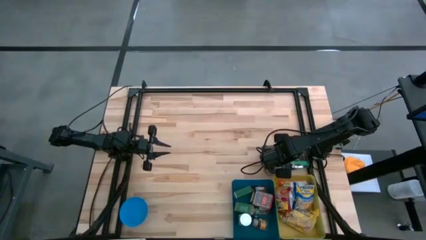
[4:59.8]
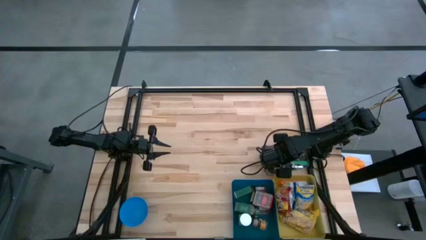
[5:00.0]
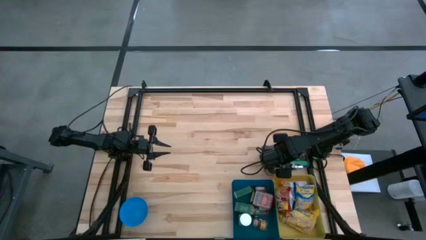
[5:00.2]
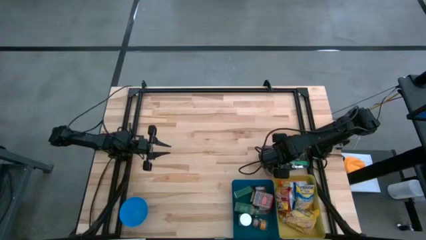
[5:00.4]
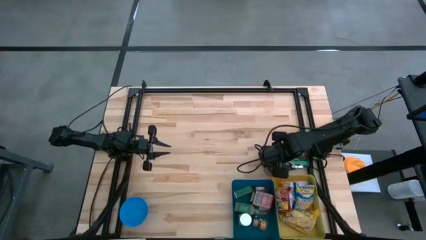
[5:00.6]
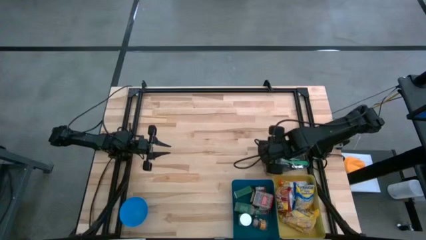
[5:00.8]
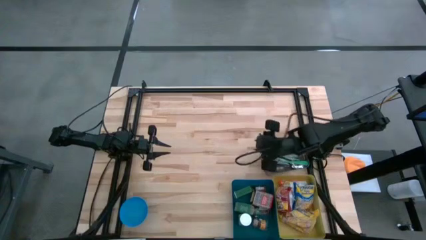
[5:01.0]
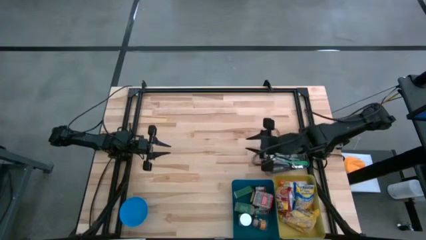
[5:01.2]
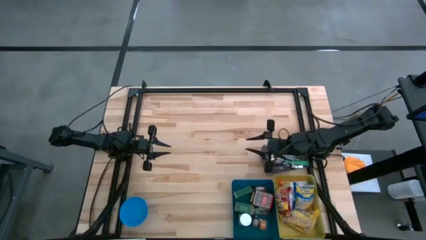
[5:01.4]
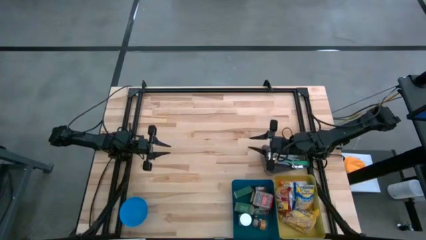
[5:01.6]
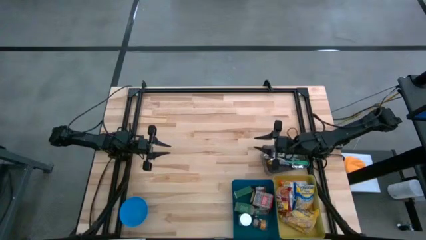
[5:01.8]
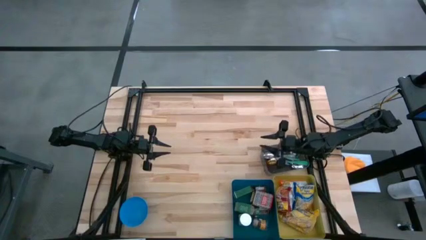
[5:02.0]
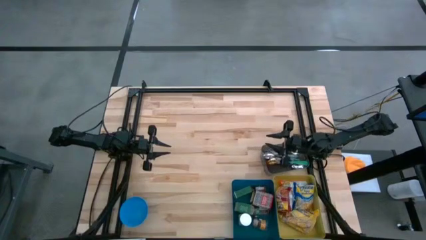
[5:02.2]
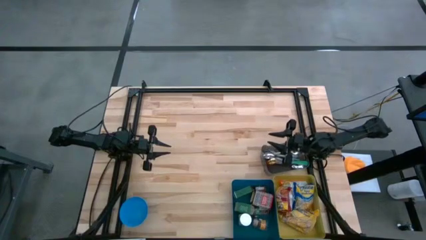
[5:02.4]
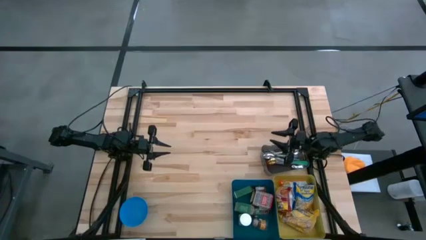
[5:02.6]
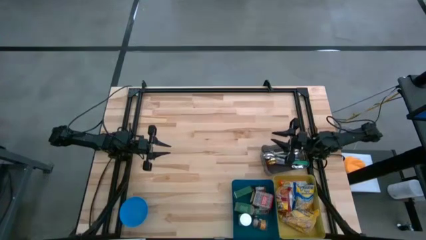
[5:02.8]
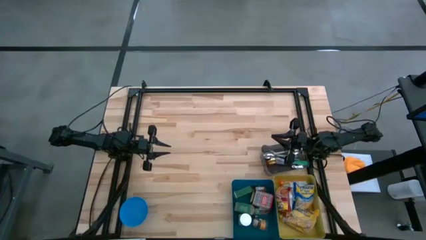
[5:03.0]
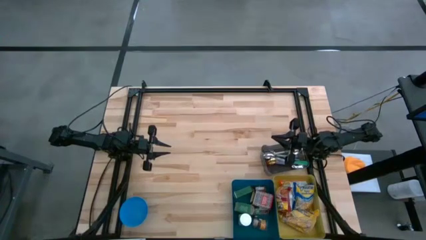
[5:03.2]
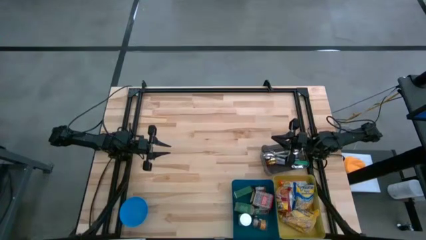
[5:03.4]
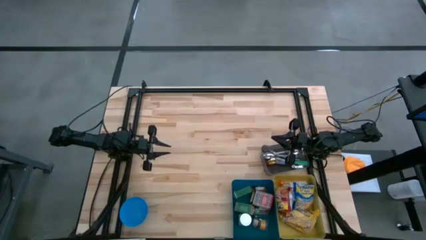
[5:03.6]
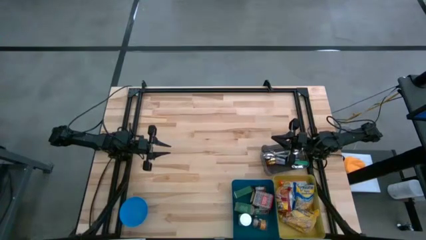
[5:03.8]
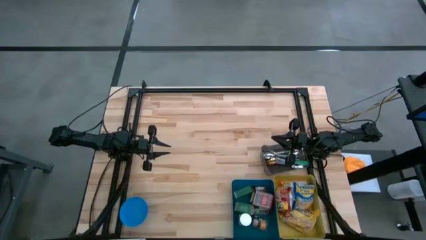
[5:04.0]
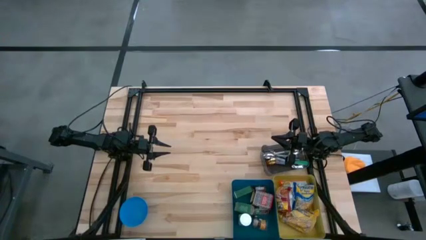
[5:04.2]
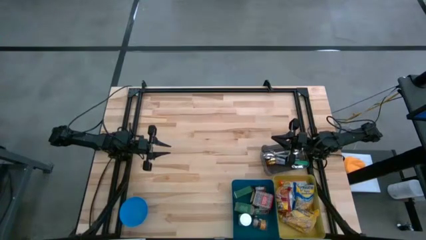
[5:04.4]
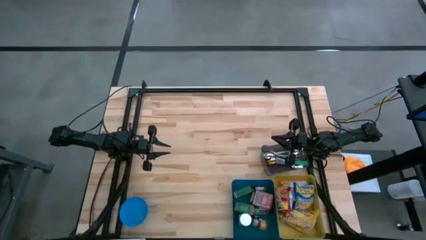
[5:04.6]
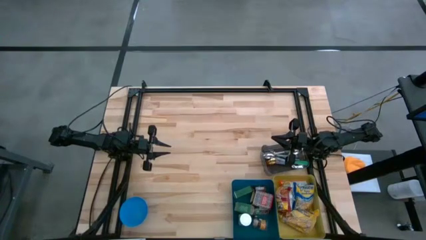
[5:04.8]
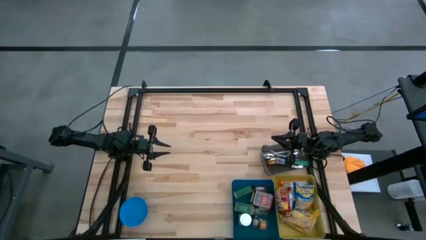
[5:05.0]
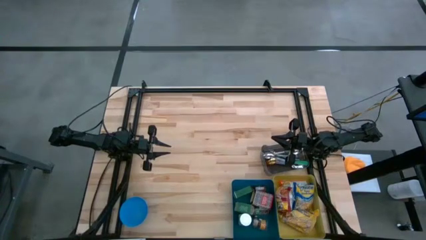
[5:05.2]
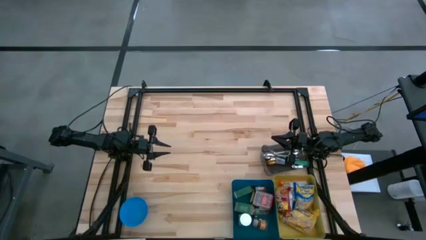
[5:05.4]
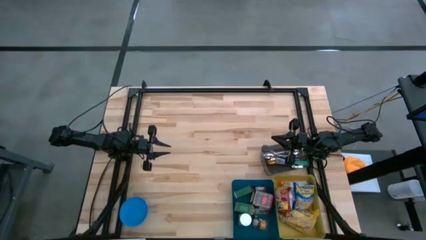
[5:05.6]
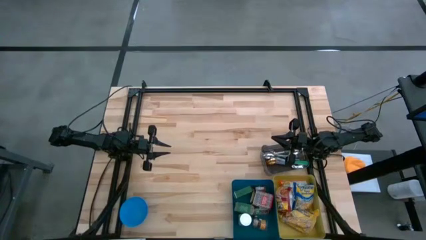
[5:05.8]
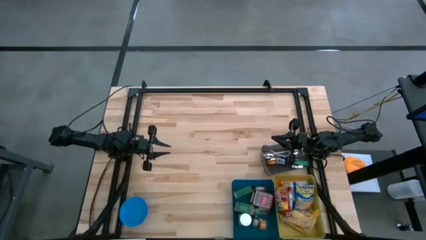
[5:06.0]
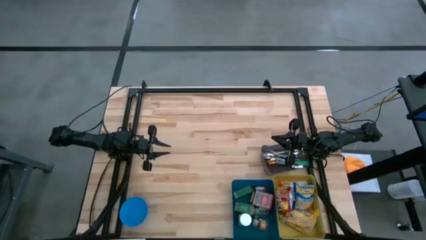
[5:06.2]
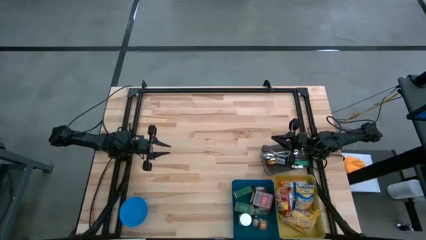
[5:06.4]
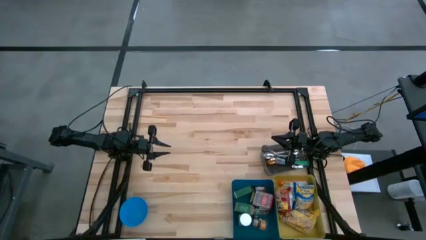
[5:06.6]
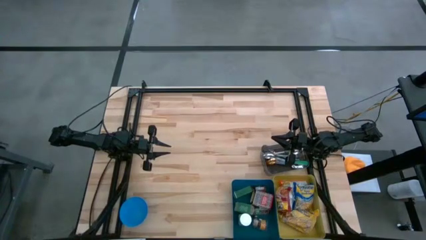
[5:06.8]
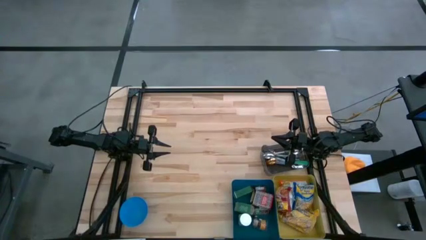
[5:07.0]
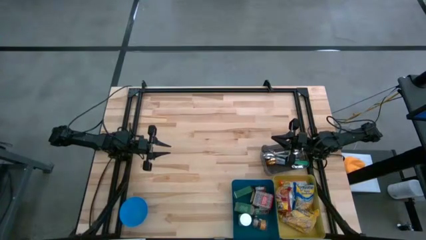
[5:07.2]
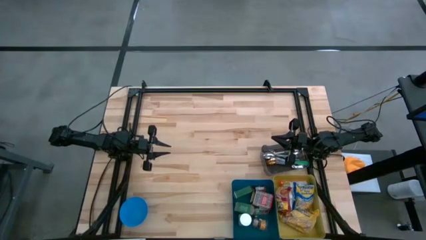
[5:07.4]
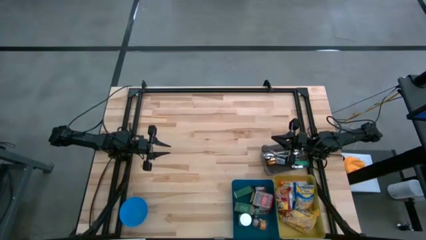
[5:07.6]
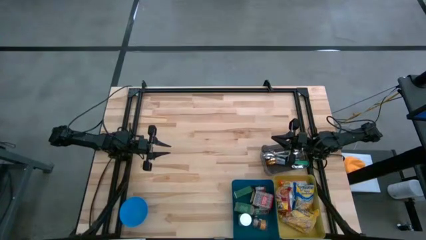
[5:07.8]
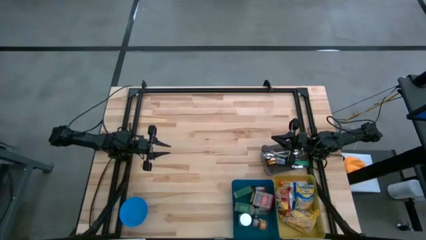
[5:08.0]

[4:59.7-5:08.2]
Return to Home Position
